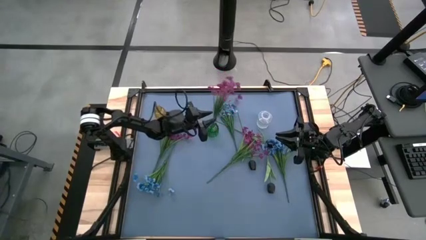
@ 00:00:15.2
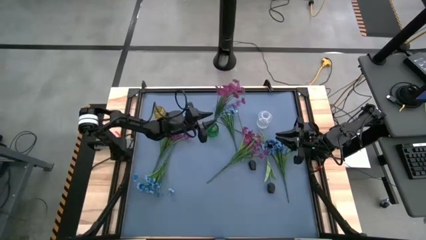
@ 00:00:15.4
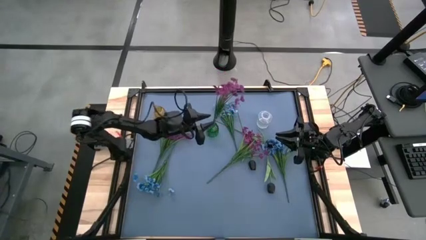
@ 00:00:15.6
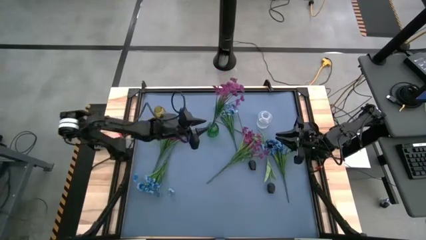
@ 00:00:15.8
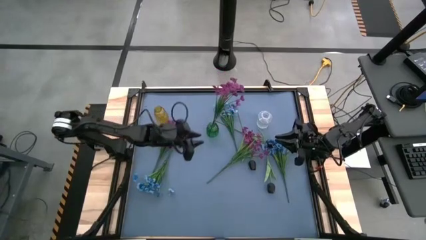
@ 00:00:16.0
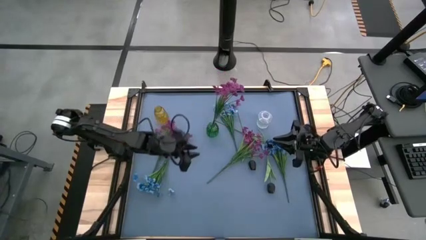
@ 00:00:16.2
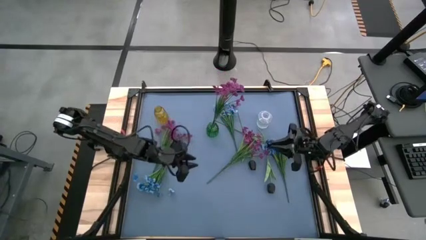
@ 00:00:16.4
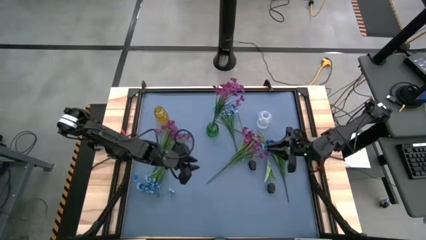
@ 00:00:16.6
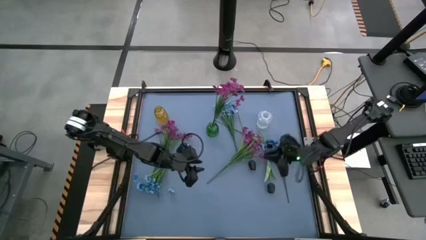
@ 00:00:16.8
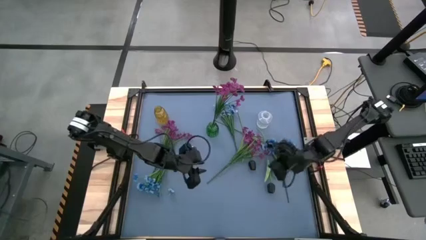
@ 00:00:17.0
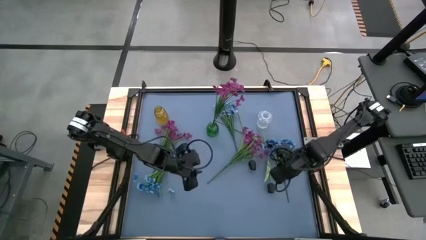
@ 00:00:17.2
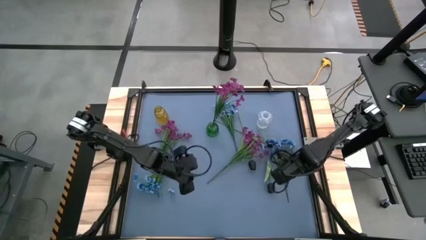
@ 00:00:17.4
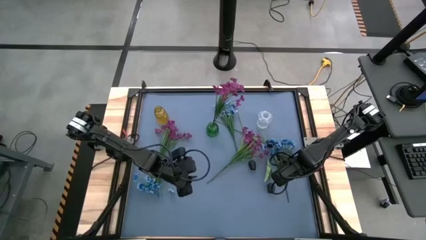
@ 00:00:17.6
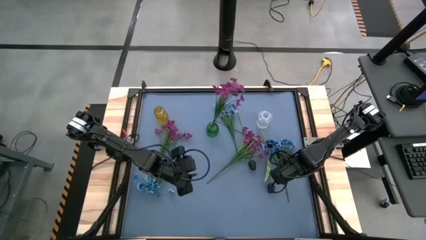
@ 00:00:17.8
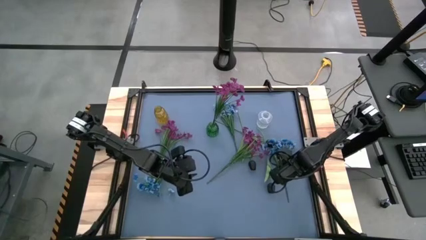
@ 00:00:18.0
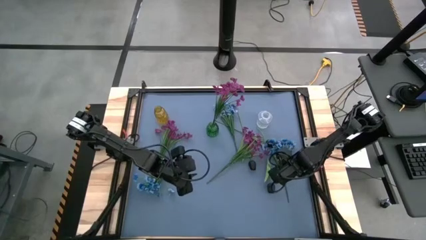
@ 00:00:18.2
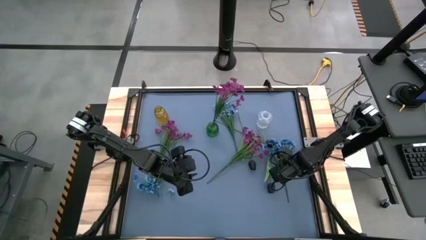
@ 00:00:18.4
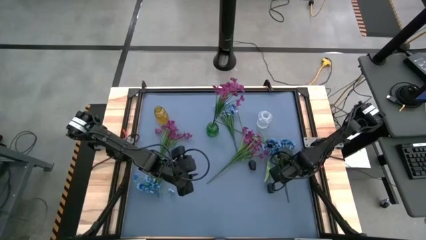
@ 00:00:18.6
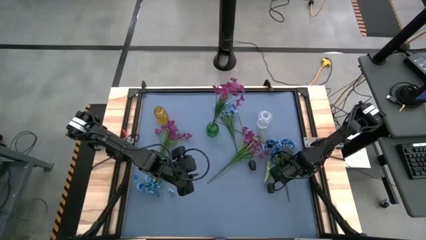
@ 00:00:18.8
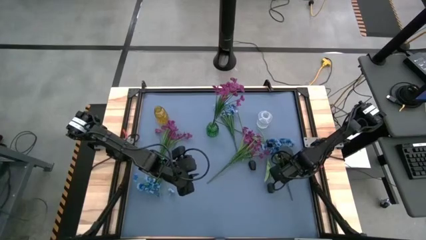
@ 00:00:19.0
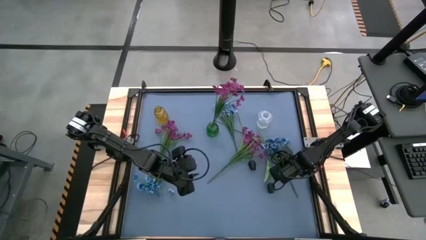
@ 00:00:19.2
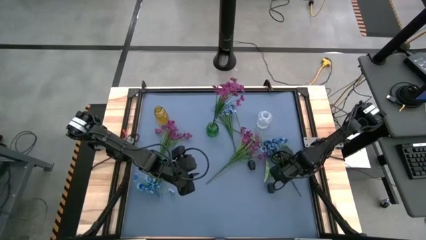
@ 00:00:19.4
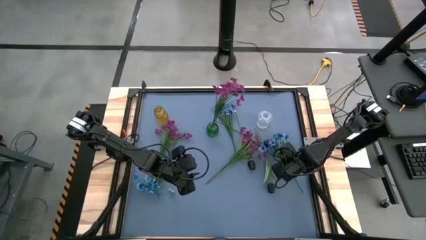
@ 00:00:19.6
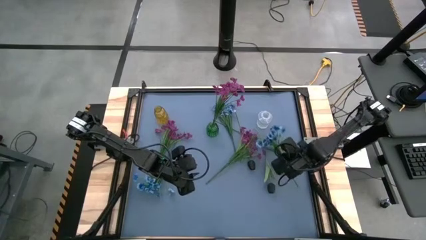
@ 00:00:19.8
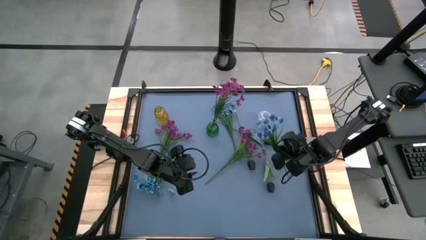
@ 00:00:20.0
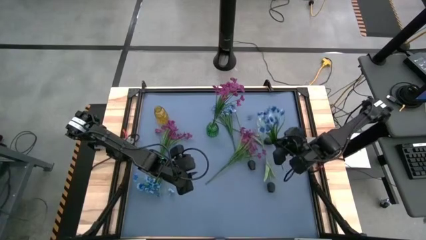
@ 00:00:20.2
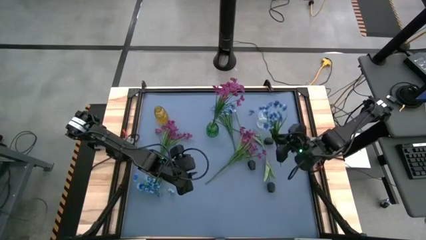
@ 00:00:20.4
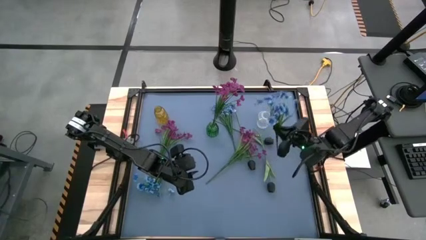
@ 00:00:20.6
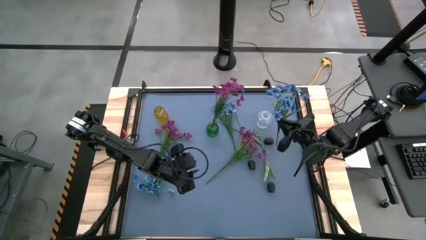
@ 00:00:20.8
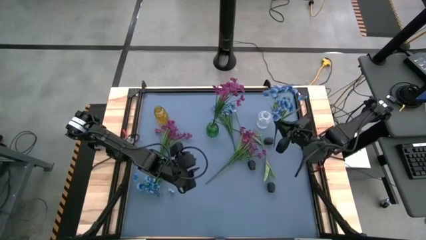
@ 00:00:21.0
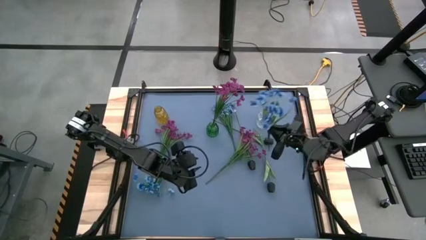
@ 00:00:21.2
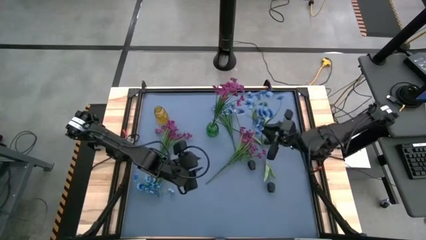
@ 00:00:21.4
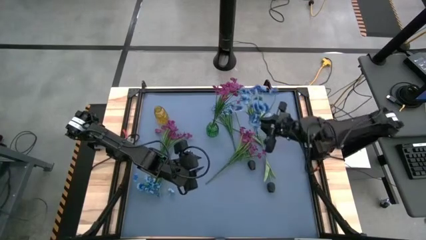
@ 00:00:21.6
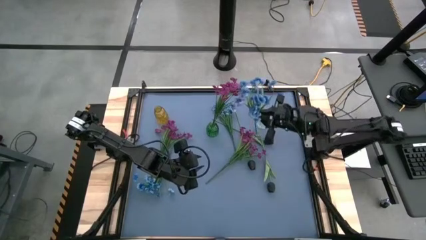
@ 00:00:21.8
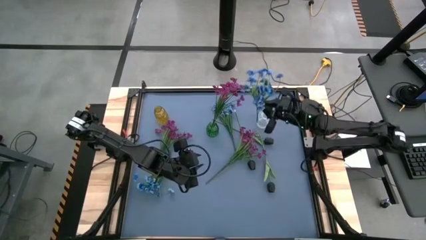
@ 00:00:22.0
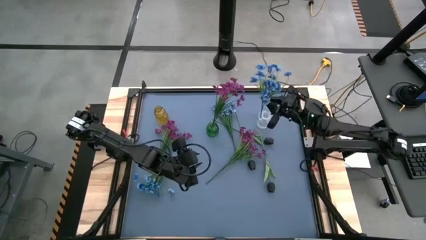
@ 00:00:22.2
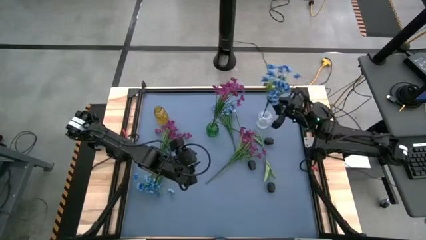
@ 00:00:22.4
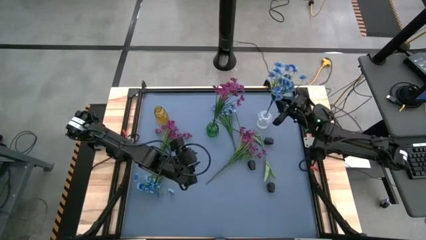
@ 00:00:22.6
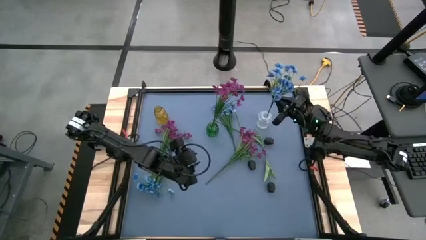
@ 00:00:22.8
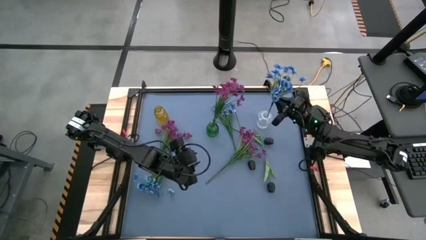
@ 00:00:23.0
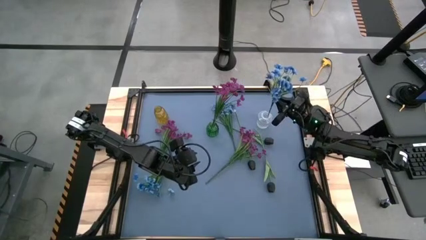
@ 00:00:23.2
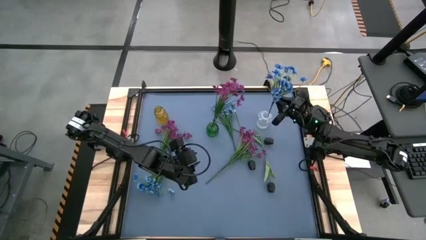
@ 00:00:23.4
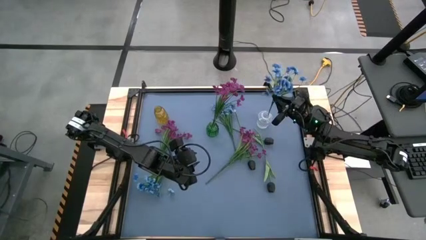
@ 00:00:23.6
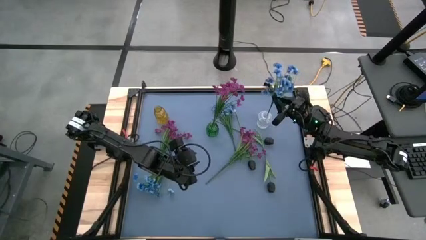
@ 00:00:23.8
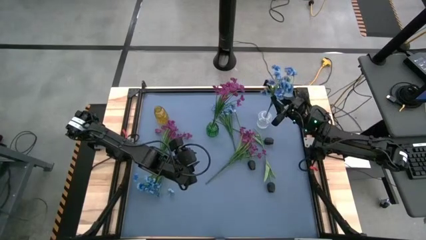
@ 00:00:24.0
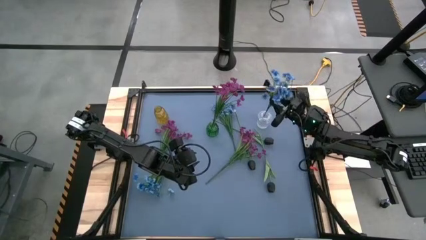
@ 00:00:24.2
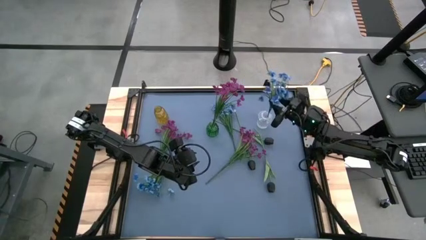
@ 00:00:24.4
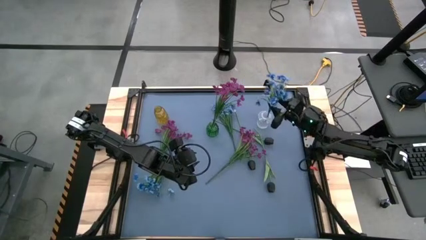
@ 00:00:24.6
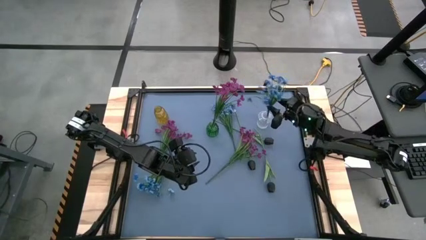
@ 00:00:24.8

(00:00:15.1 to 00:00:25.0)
Task: Sort flowers into vase by color
Put the right blue flowers into the transparent vase
